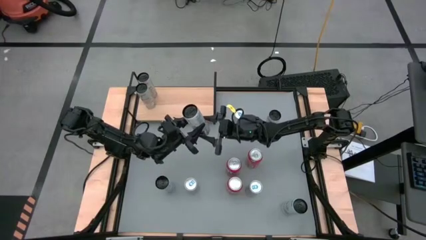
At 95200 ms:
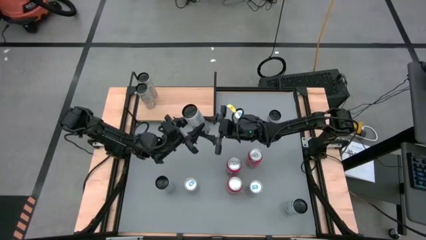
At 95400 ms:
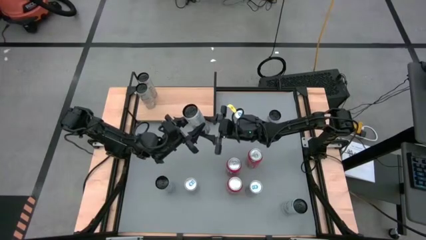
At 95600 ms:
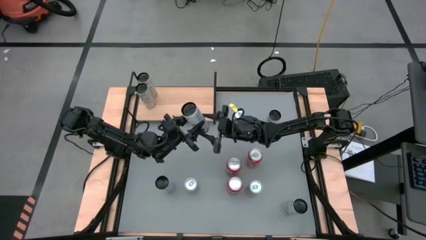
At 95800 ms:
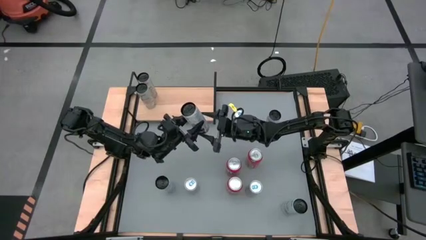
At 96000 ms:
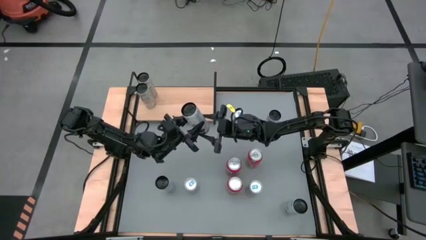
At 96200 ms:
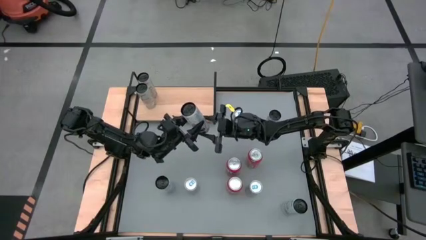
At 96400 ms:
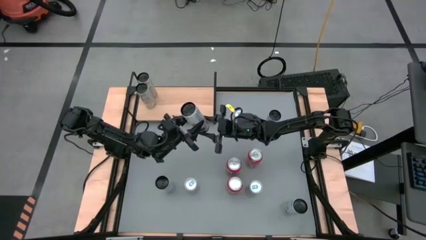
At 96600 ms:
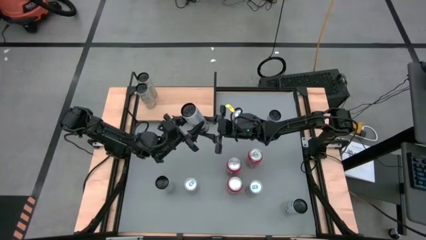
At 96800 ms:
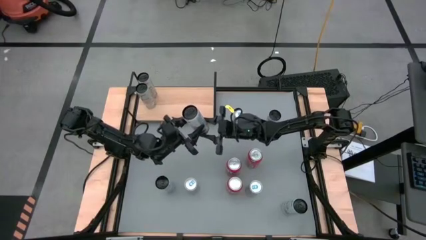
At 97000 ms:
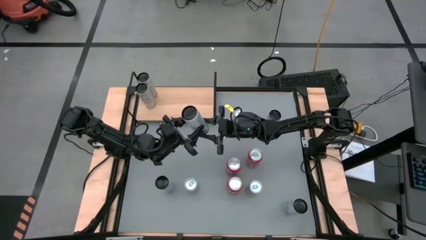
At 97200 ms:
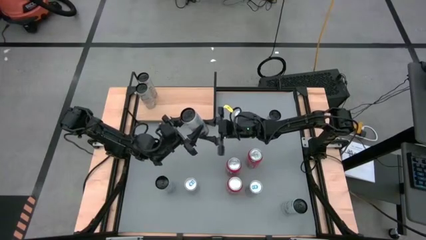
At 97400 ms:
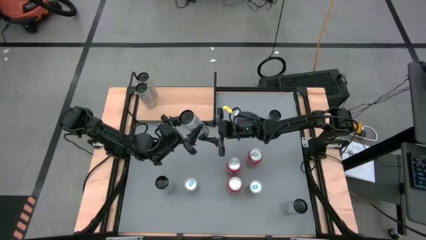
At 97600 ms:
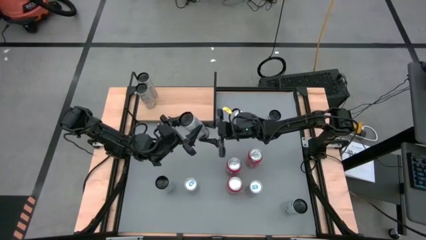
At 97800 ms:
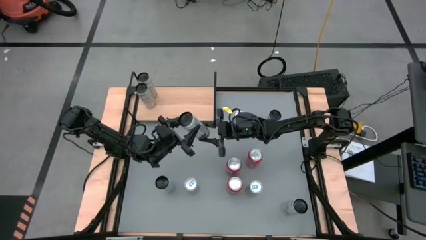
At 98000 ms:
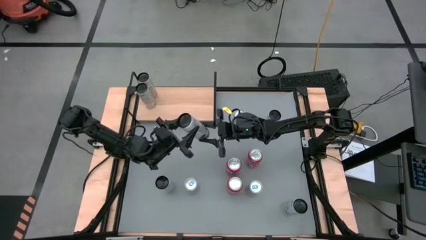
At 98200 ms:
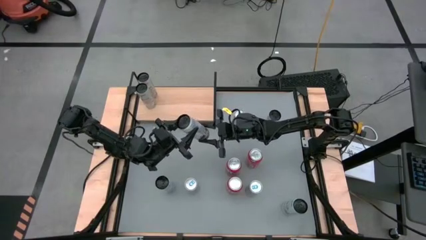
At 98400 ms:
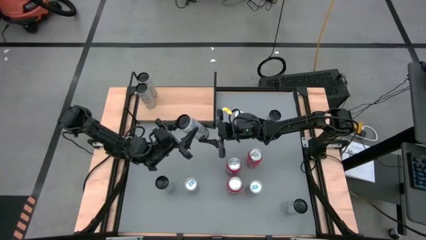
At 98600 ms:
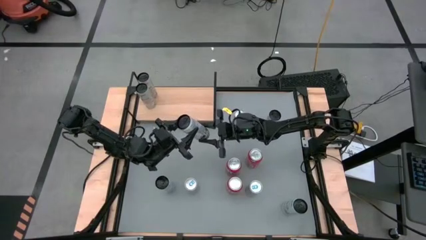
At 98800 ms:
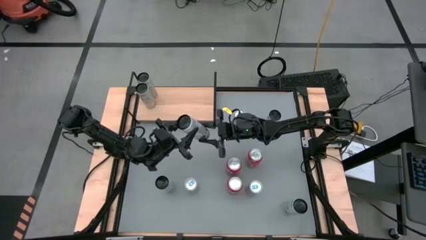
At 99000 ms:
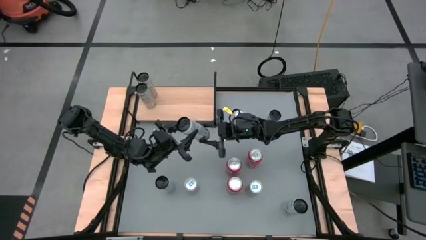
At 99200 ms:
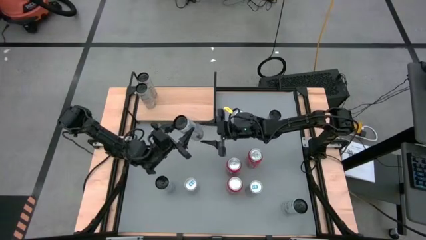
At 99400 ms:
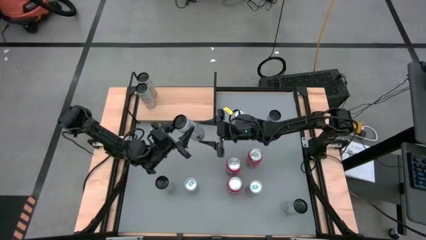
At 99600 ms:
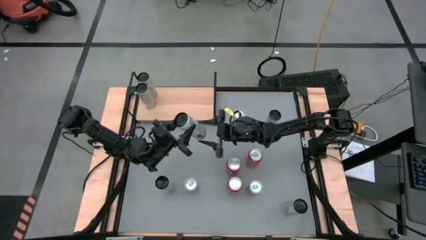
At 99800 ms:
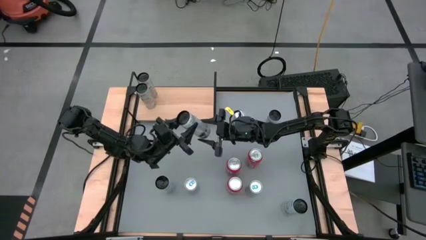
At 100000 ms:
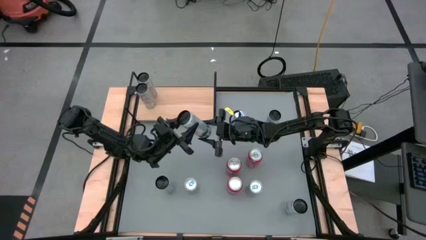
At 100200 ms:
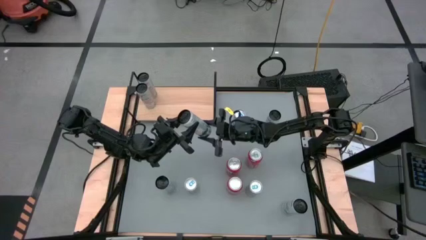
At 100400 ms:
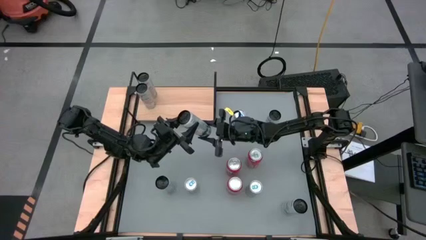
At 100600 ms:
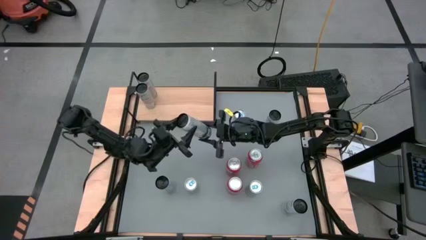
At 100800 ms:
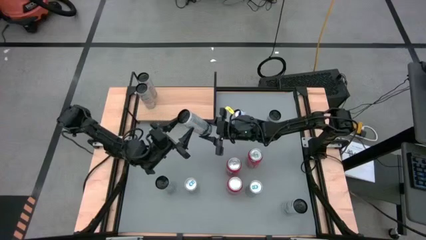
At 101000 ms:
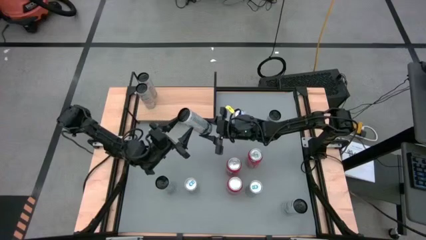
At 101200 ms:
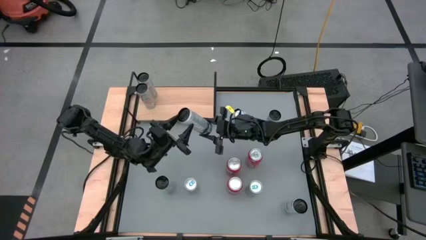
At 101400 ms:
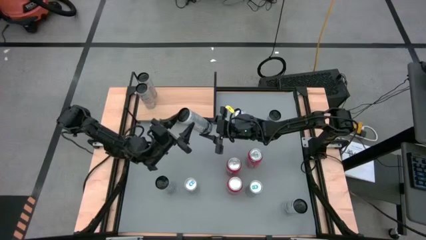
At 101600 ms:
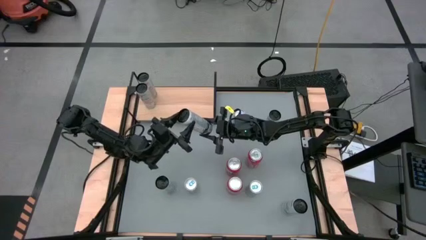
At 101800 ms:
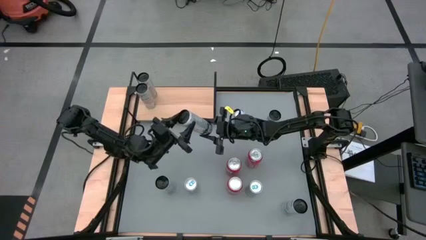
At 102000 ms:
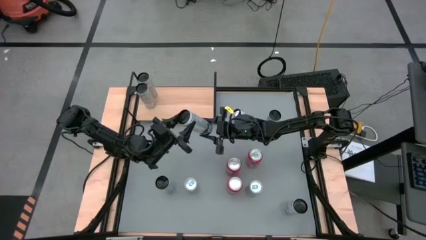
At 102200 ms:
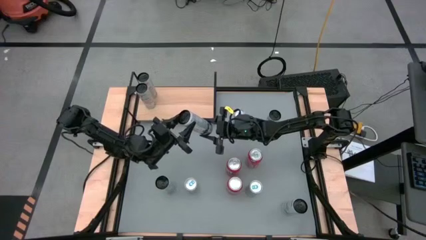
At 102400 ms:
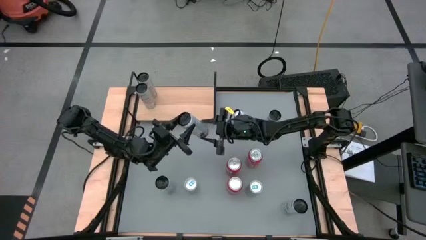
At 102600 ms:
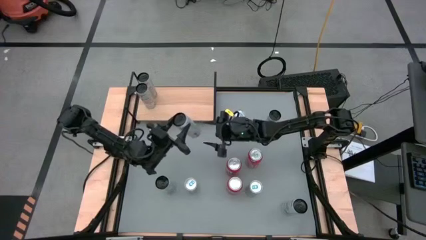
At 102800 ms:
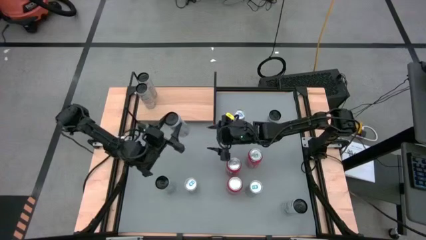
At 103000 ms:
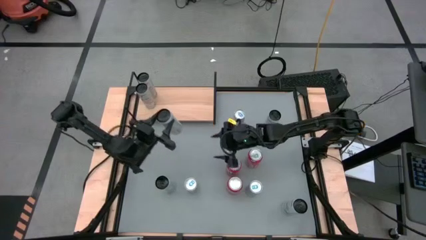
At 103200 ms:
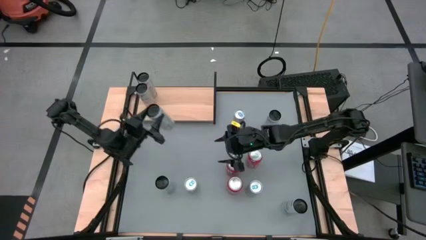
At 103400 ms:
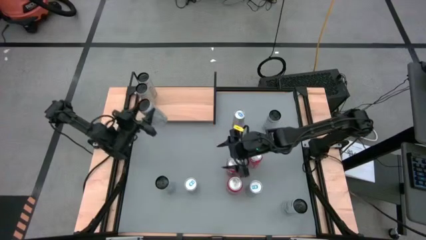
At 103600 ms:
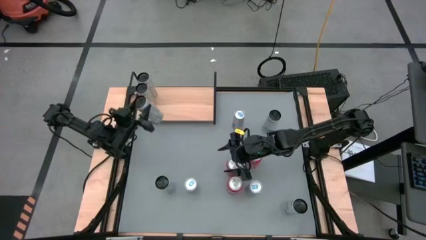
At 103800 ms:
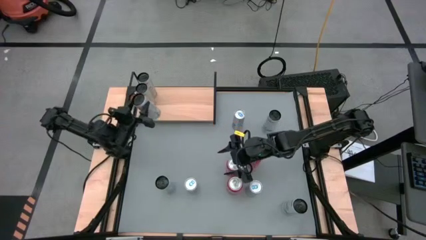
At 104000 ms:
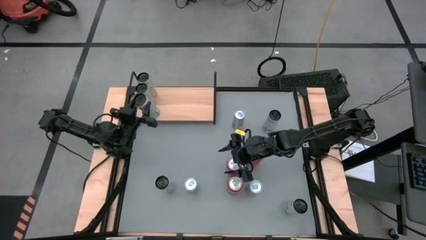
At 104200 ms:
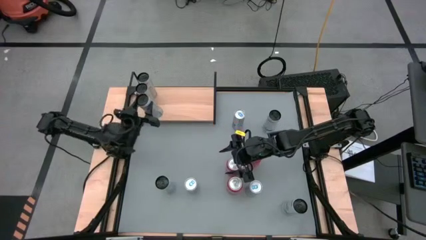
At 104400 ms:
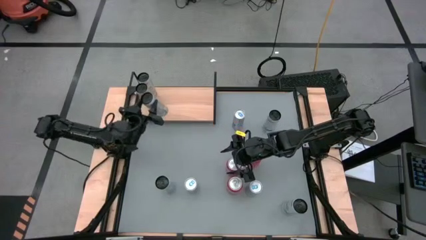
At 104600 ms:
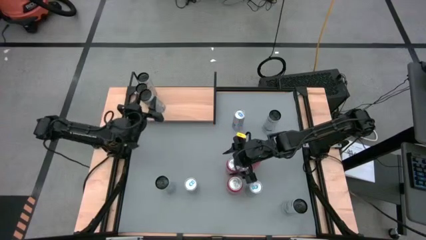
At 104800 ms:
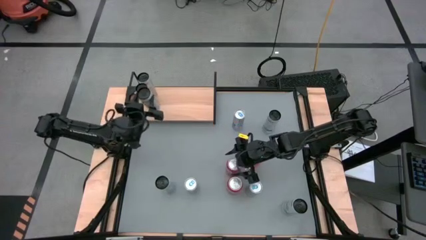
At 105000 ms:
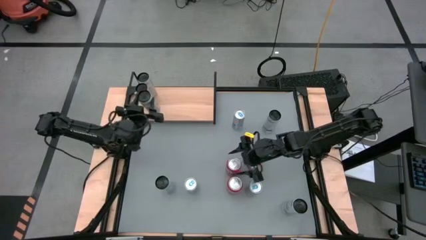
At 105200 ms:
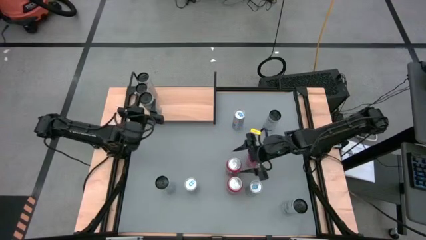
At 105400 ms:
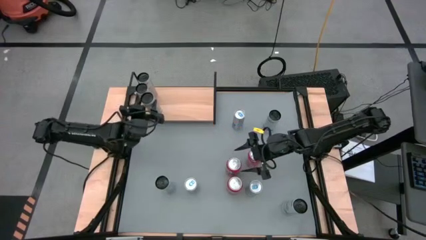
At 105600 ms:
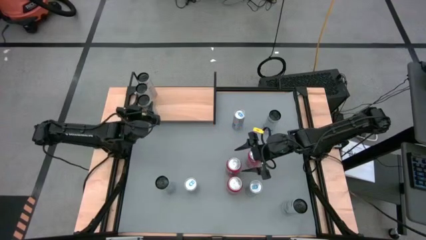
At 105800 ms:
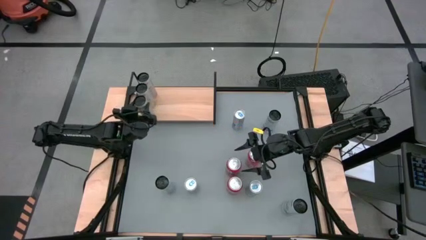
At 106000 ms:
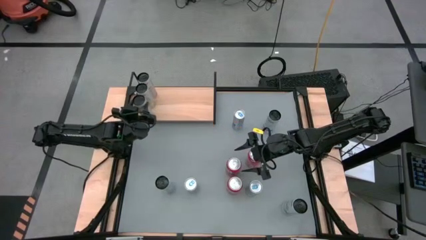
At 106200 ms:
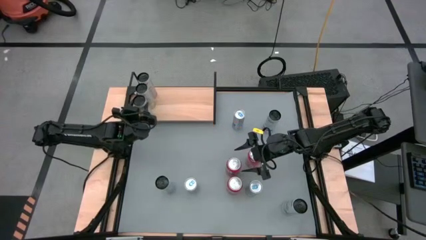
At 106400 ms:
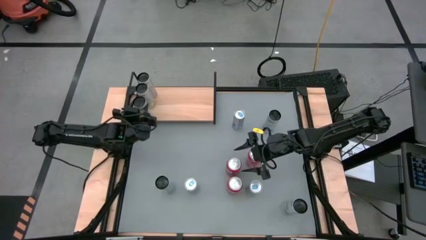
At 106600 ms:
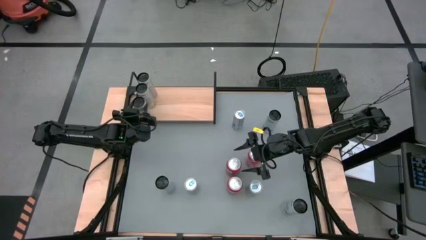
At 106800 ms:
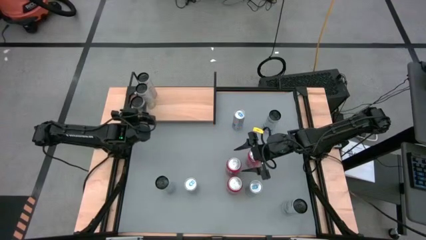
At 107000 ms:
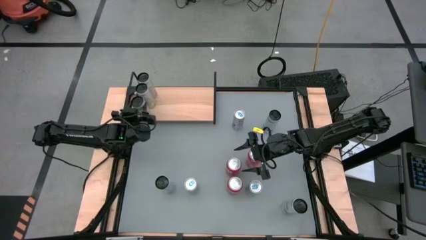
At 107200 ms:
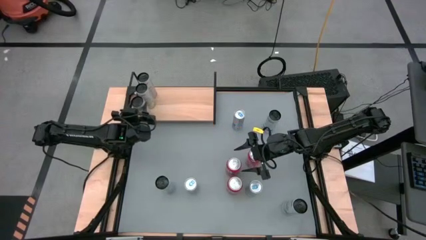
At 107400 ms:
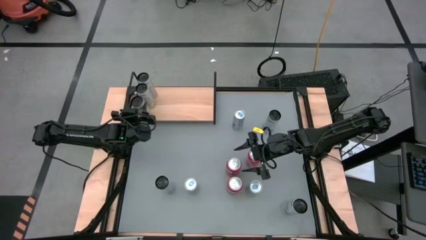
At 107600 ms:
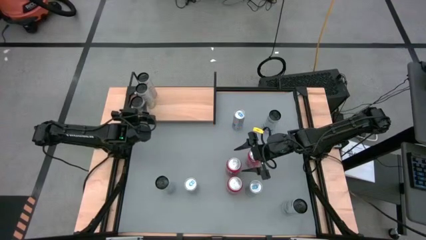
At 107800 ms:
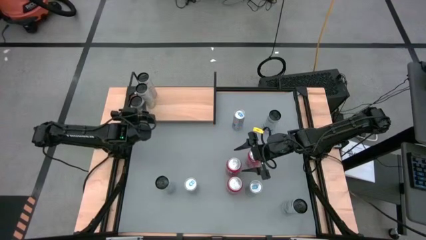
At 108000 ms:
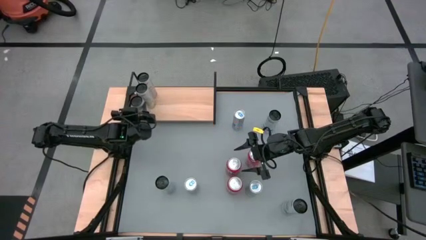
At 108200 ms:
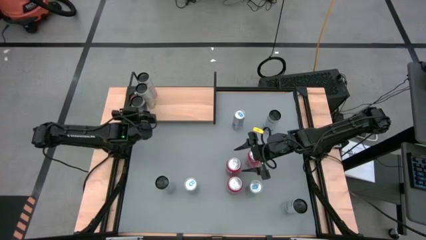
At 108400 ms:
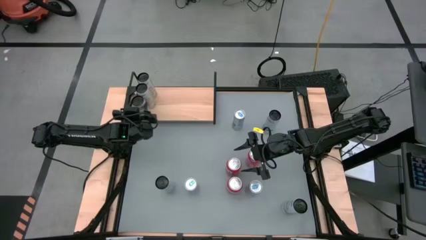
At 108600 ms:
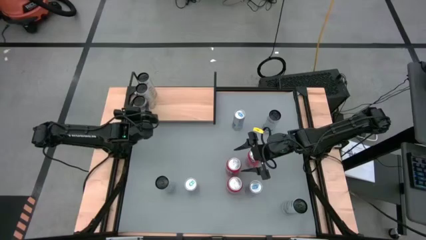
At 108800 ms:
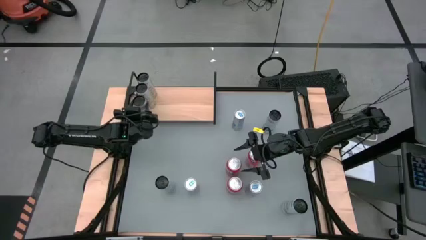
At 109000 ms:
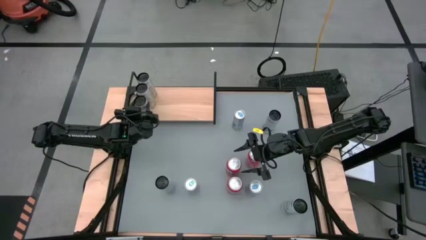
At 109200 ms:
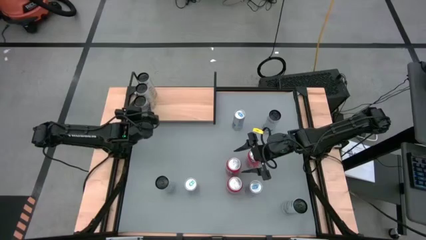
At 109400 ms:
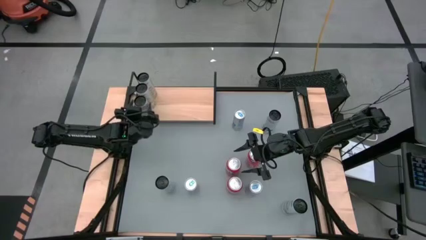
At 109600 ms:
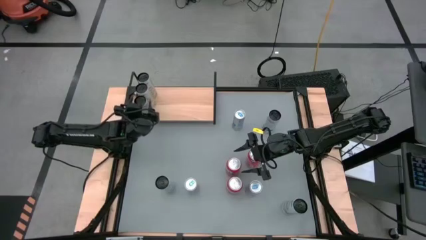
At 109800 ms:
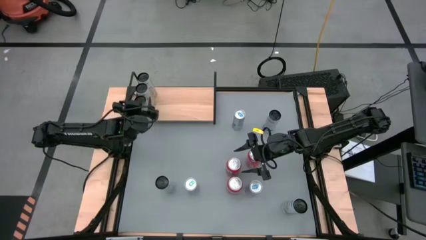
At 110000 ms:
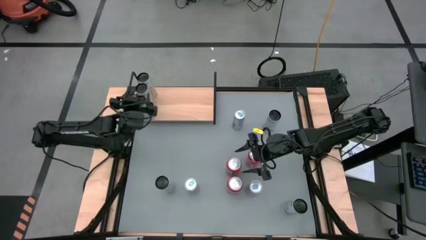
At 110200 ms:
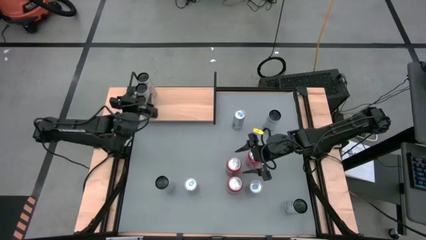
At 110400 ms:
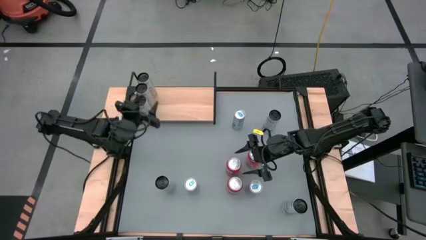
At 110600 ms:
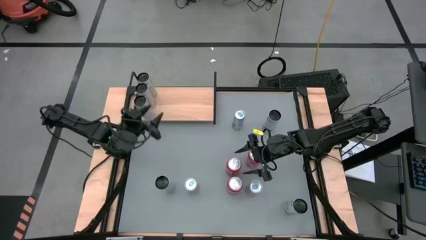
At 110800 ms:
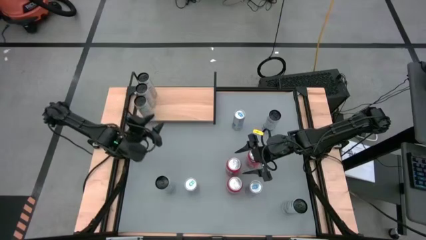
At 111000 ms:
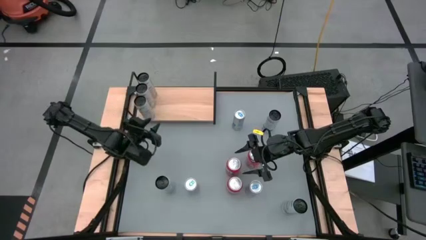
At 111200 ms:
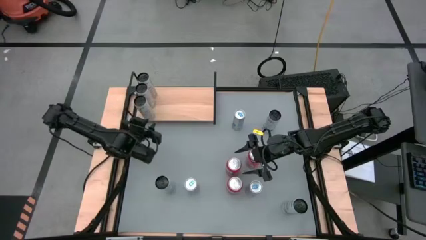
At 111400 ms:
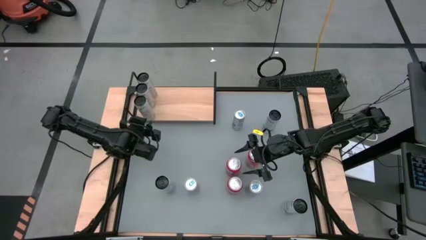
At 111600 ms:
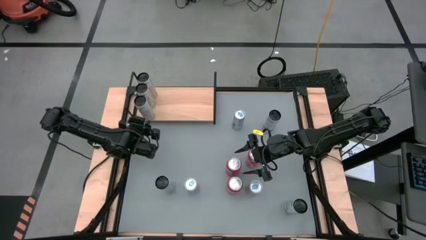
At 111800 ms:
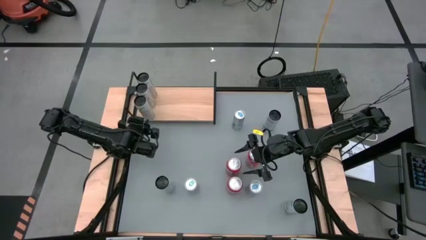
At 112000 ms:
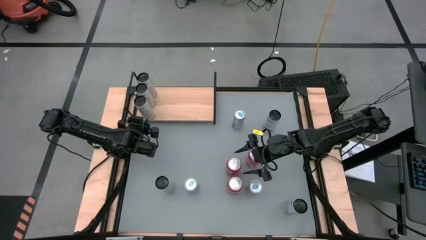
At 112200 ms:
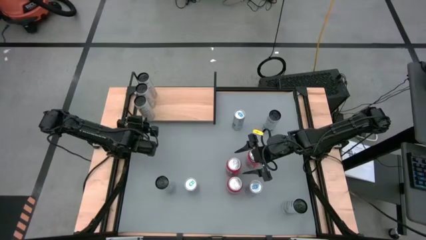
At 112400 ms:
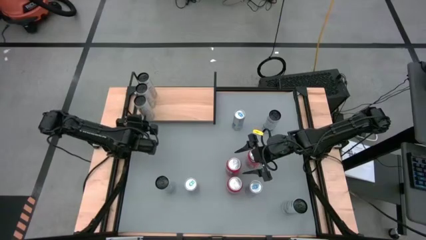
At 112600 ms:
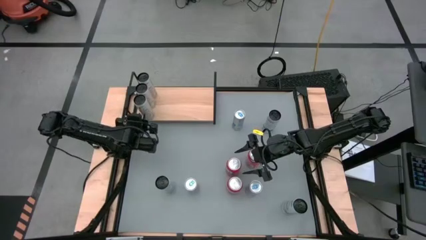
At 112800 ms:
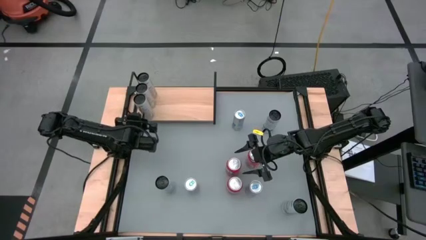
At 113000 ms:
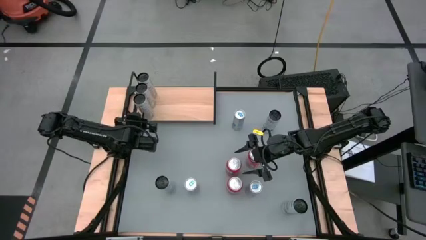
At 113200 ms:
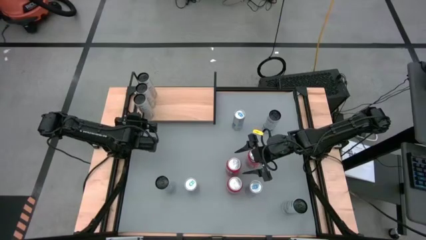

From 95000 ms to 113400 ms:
Task: Place canned beverage on shelf
Put the white-yellow soda can on the shelf aligned with the other white-yellow soda can
